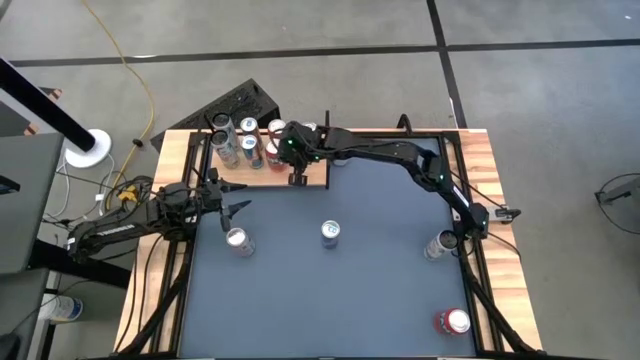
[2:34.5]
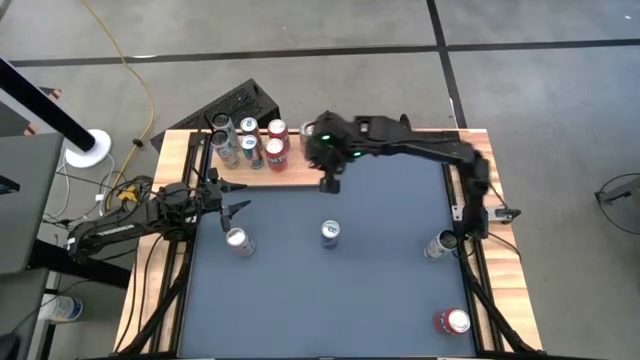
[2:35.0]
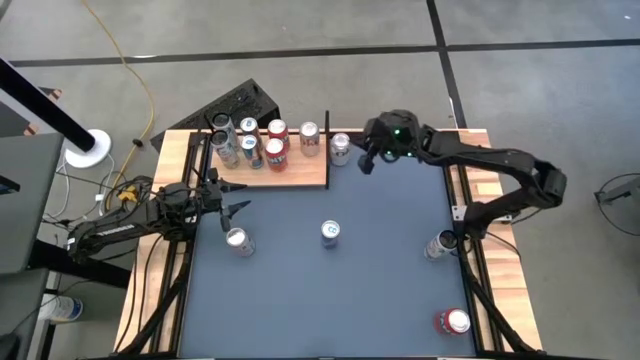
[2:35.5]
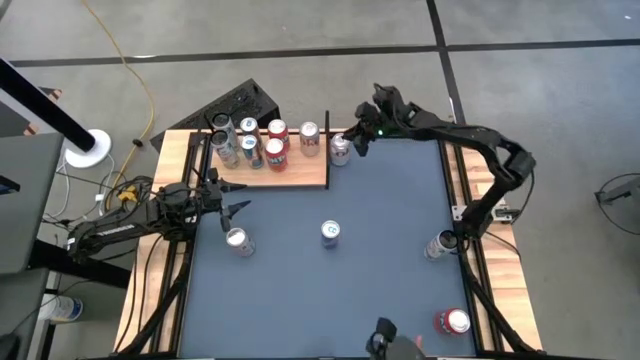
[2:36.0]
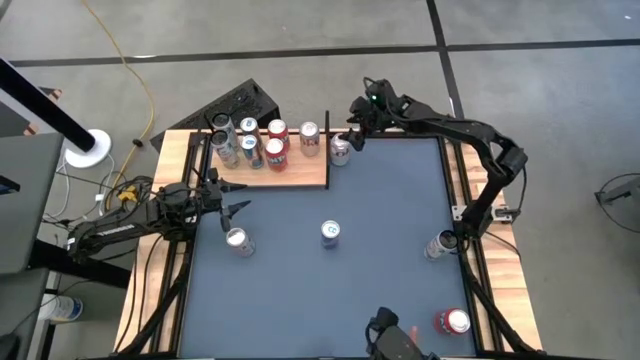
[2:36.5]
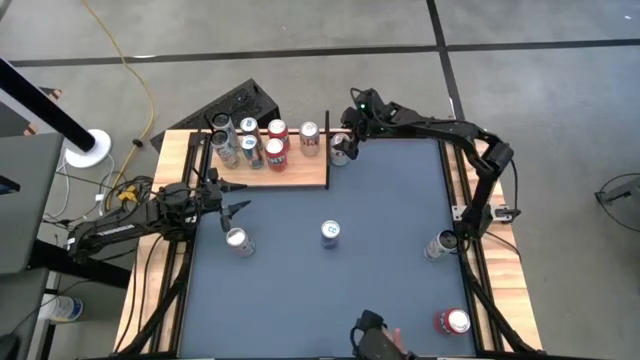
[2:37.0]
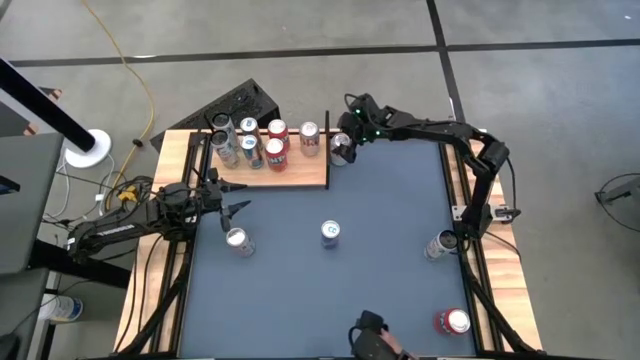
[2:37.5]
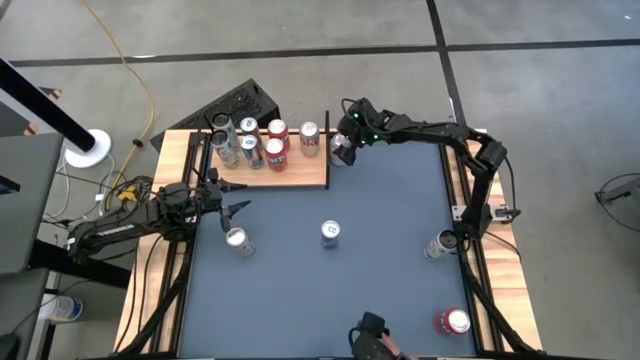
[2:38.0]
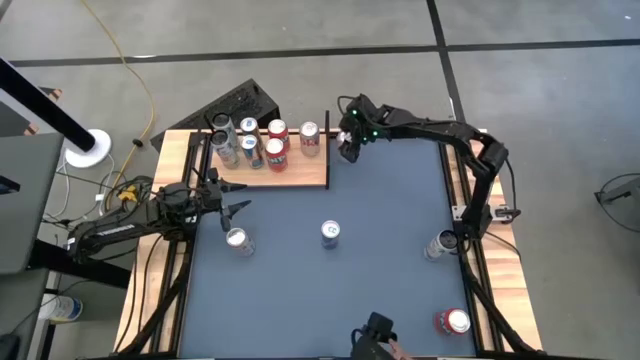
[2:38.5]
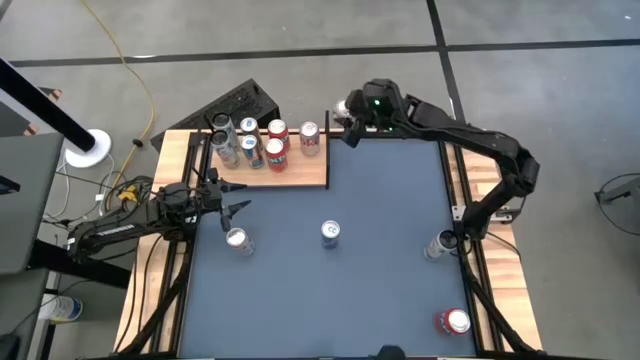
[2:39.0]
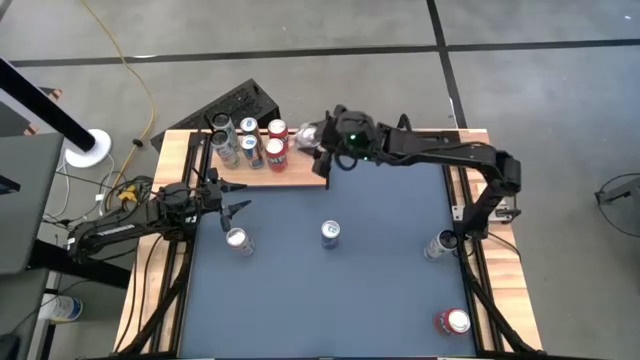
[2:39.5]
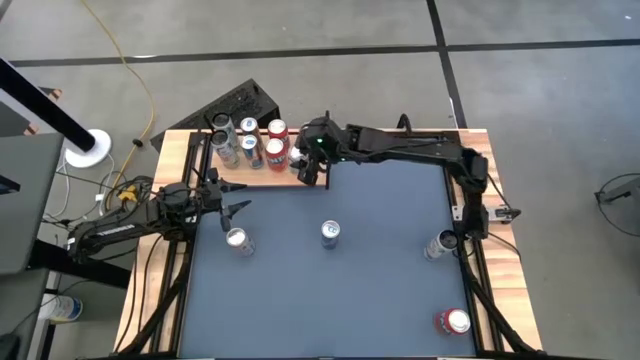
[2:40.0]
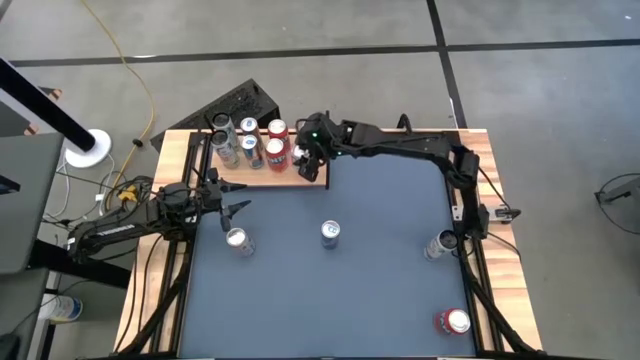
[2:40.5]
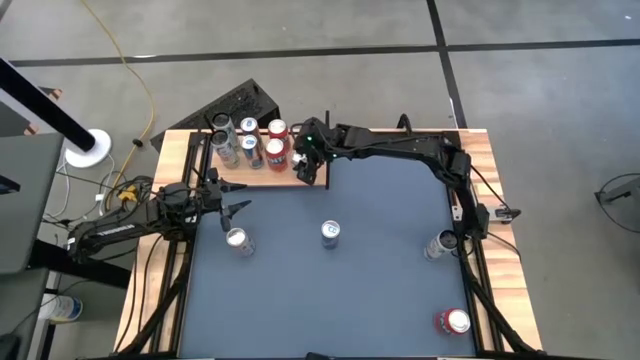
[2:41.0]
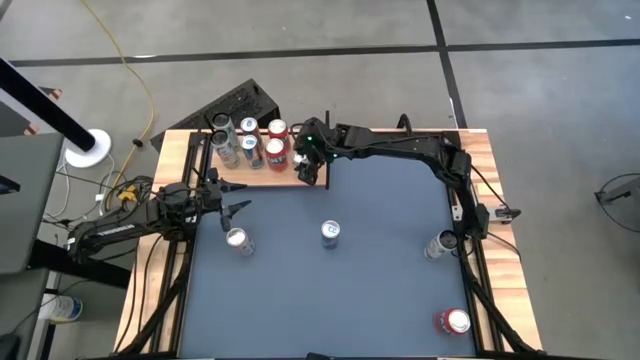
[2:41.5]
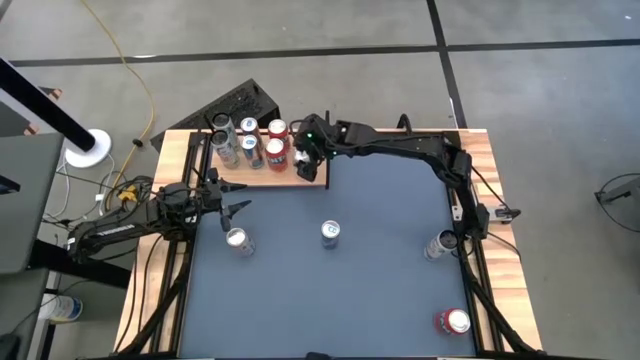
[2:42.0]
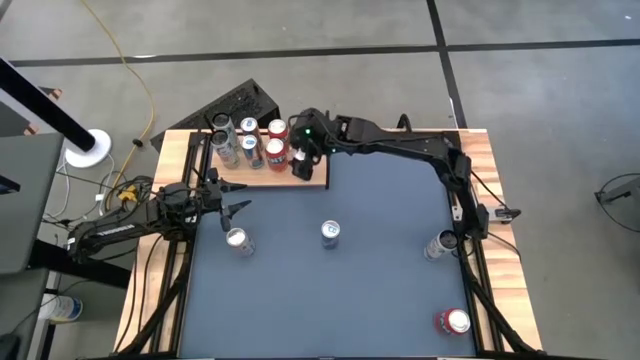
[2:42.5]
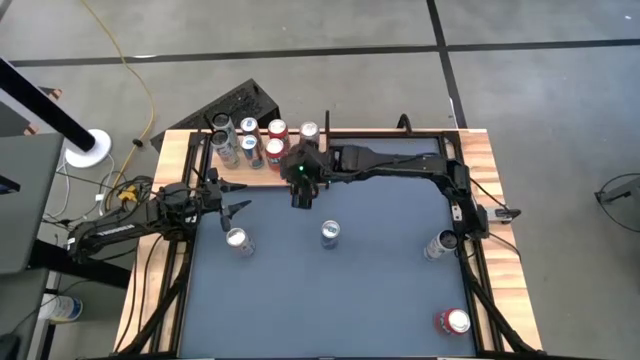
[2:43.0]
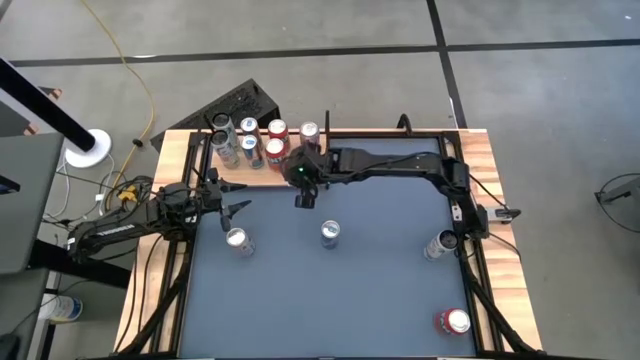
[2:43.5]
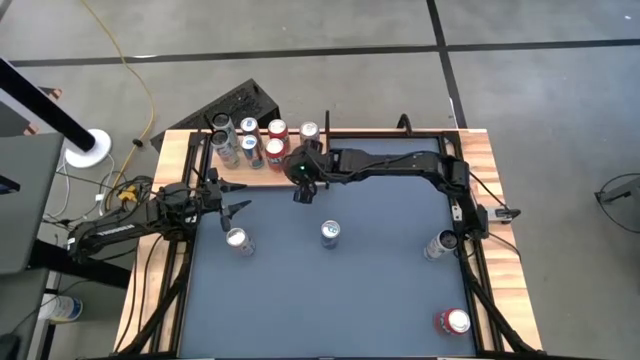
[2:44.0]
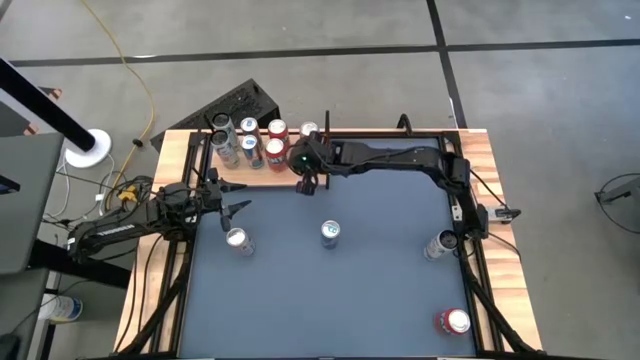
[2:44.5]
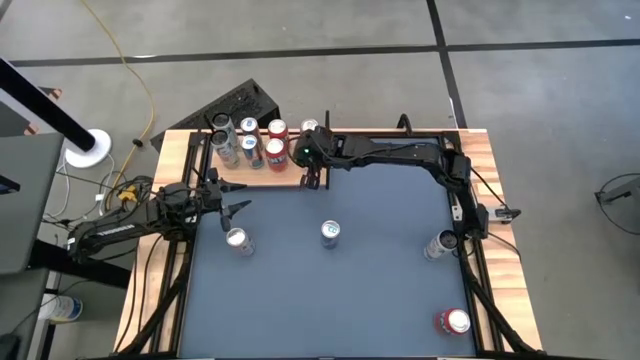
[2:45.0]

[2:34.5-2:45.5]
Task: Place canned beverage on shelf
Put the top silver soda can on the shelf aligned with the other silver soda can

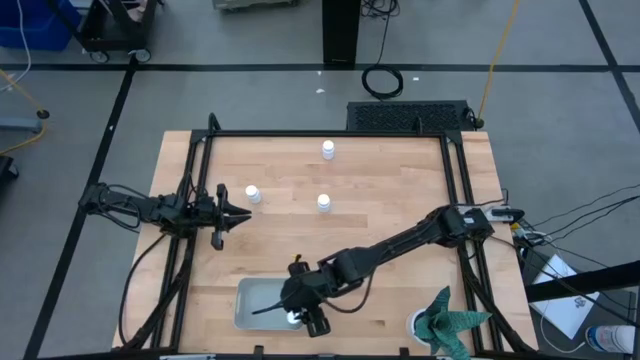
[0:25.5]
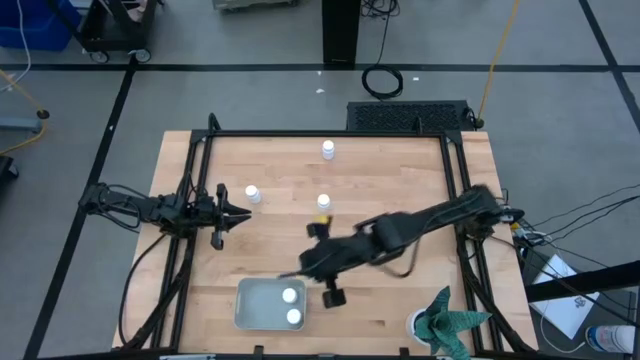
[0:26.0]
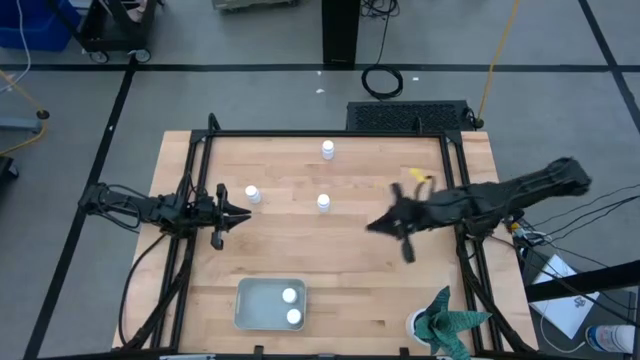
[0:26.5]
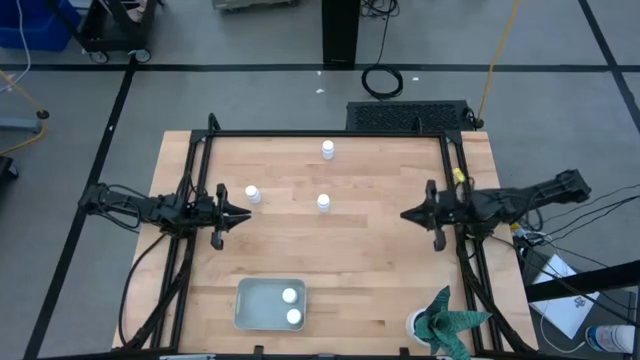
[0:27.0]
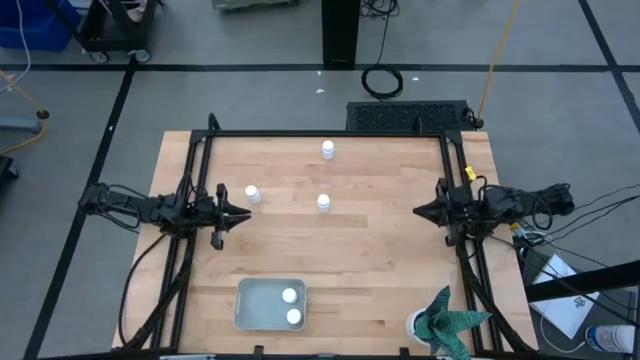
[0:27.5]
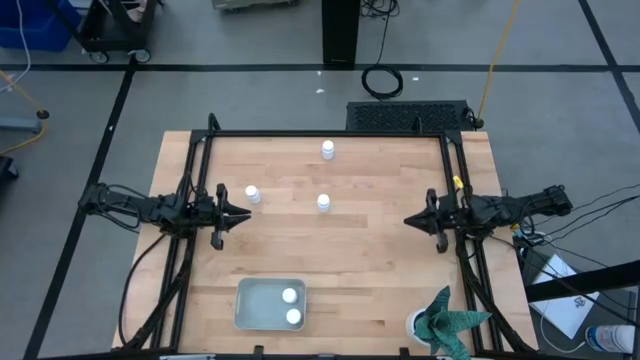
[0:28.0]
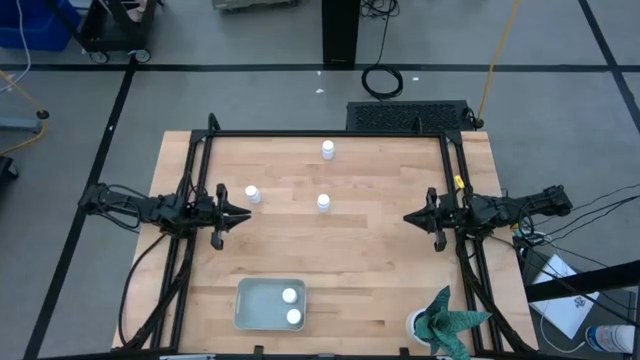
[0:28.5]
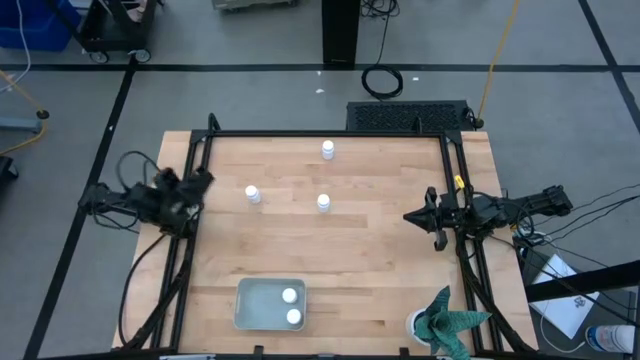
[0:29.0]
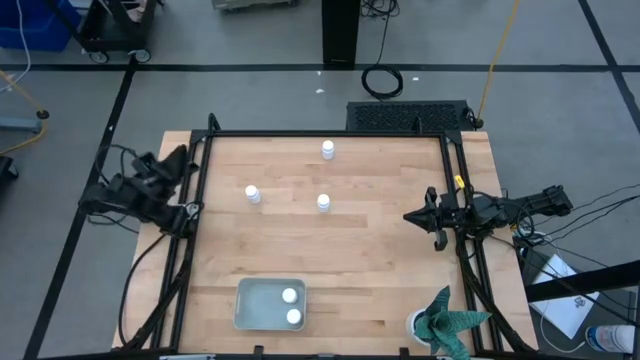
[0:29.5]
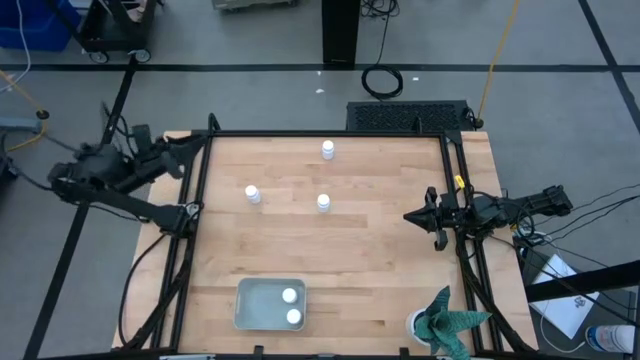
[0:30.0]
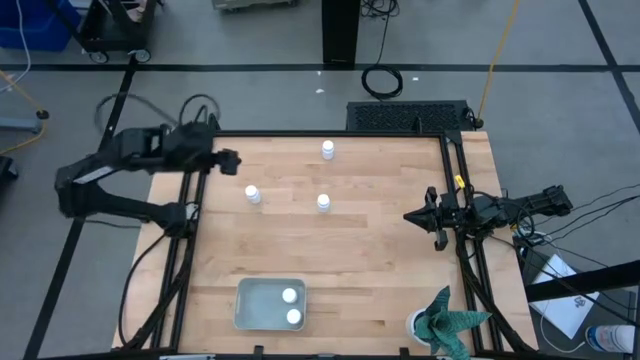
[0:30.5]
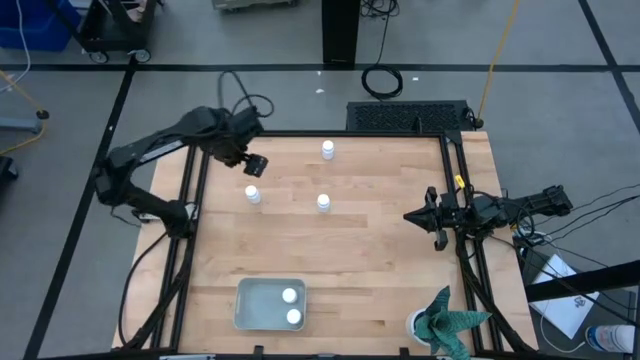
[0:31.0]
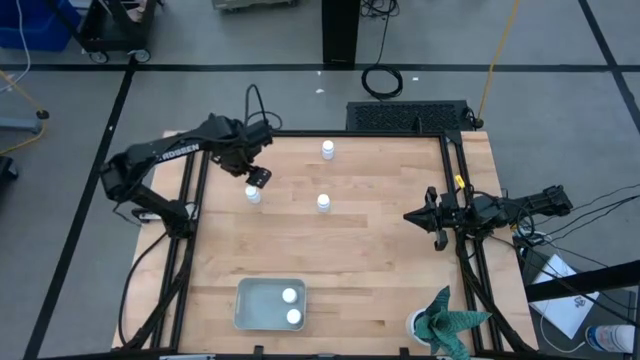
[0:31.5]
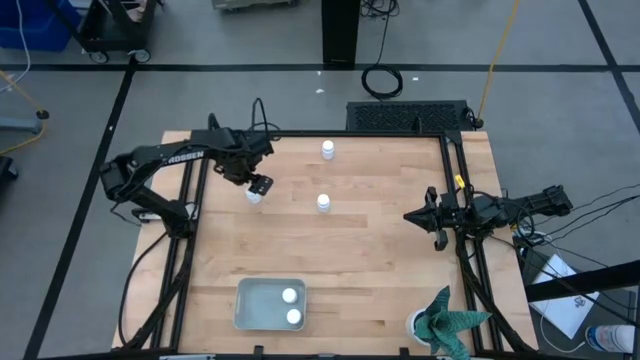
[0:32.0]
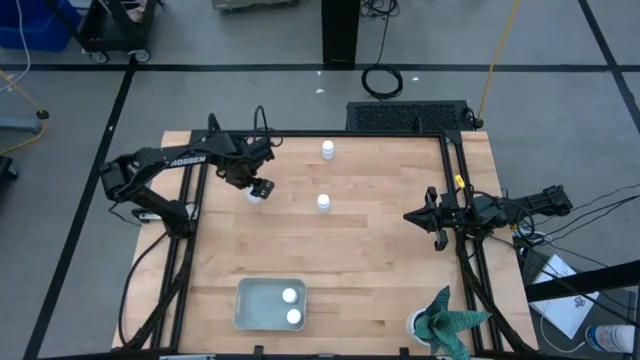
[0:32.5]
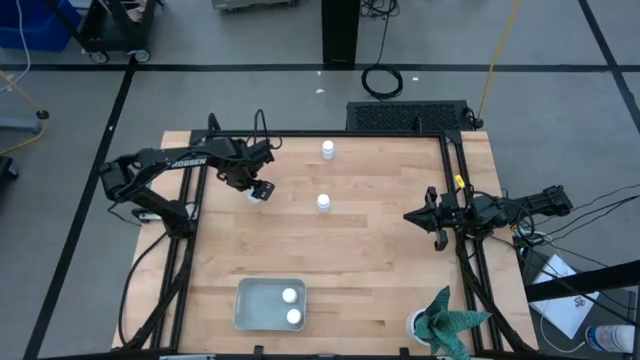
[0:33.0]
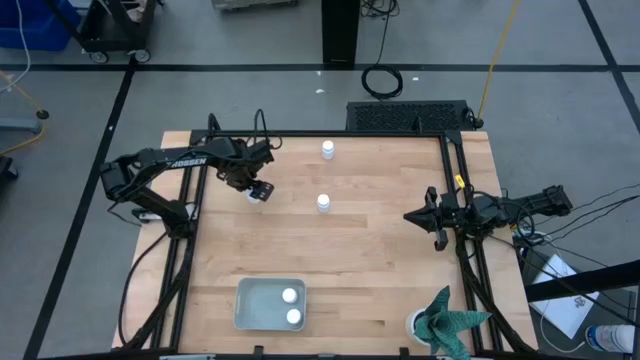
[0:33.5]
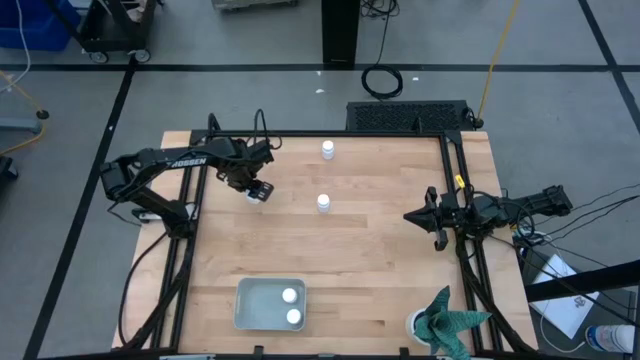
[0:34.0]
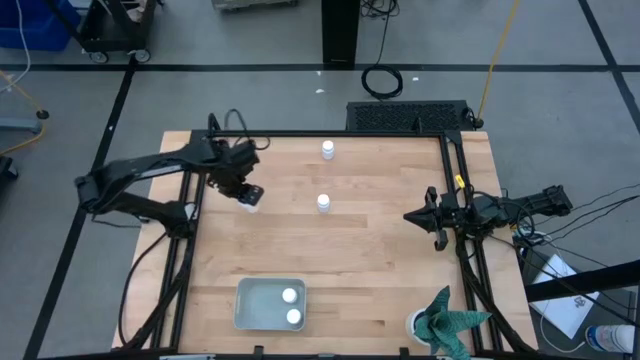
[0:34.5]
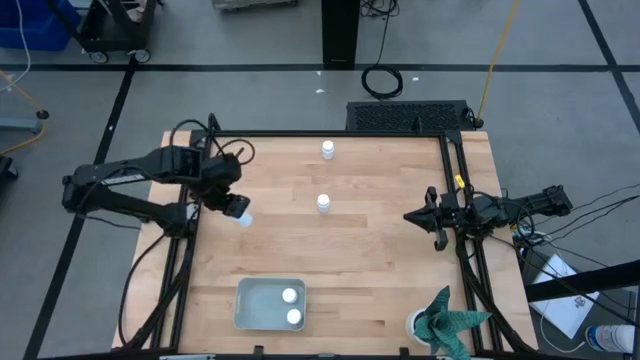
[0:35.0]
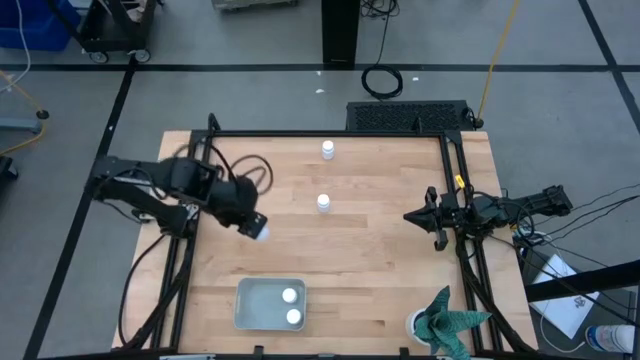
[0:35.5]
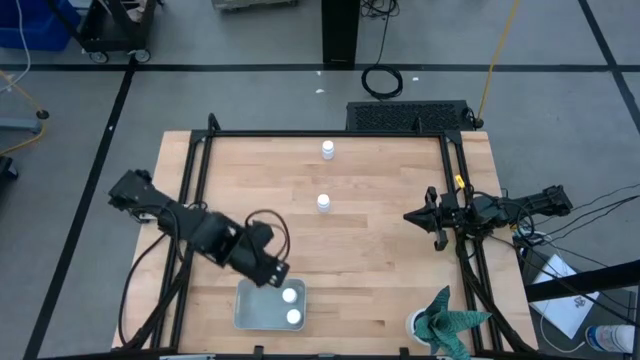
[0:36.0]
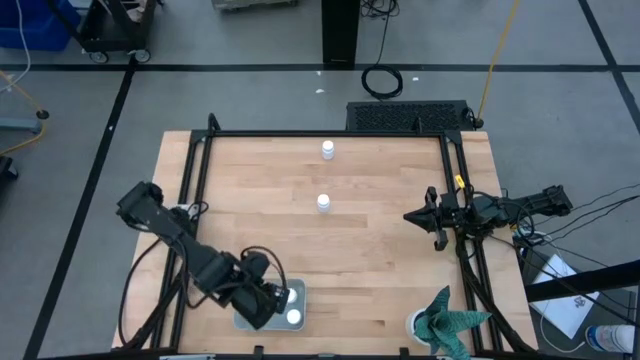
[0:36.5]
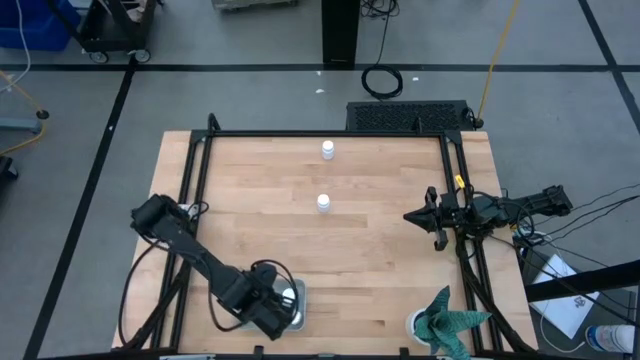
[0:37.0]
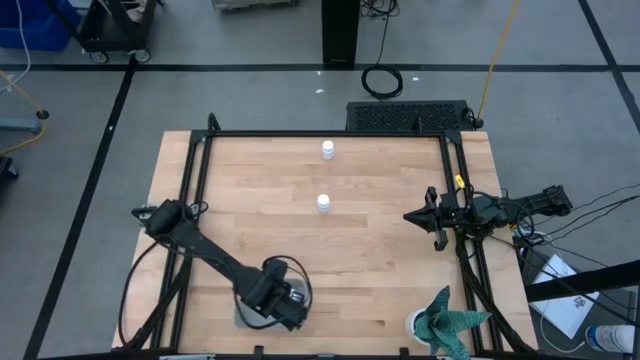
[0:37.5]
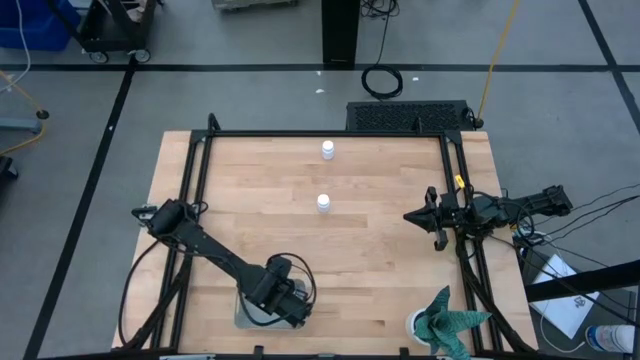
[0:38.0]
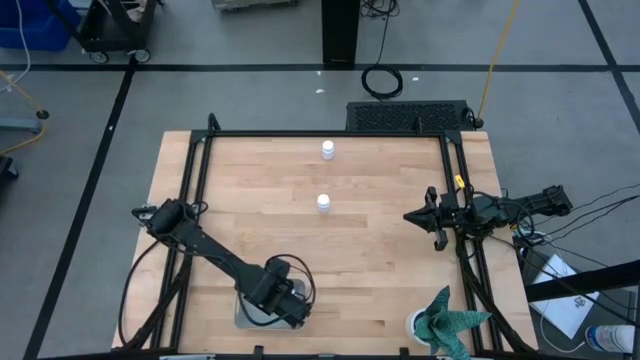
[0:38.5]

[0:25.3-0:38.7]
Task: Pick and place pill bottles into a basket
Put the white medicine bottle into the gray bin
